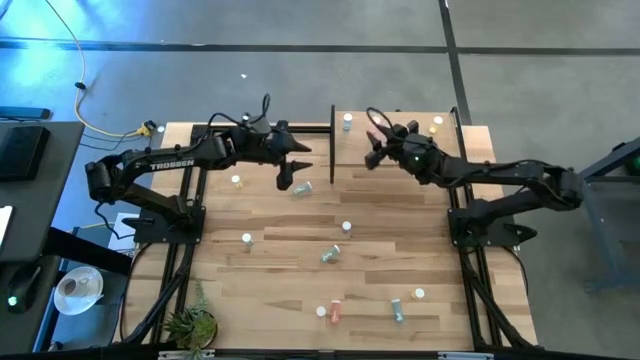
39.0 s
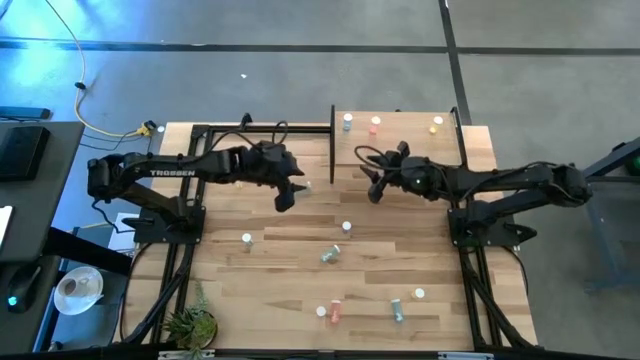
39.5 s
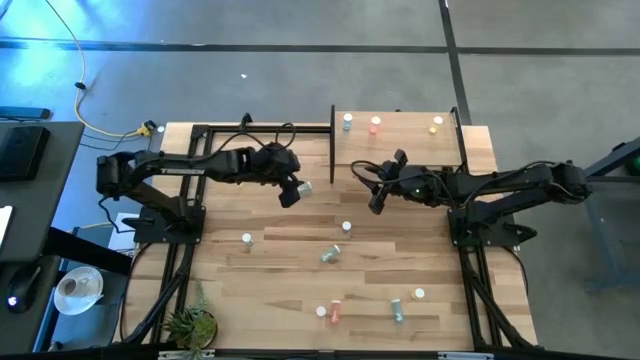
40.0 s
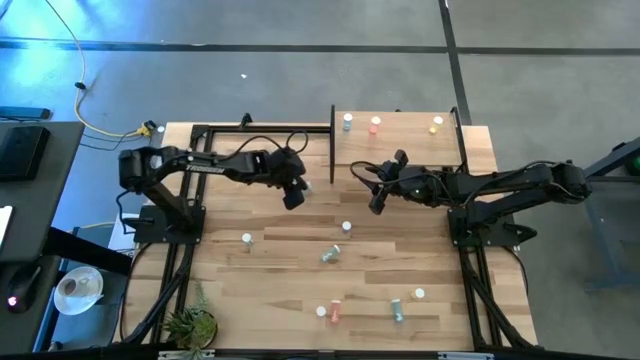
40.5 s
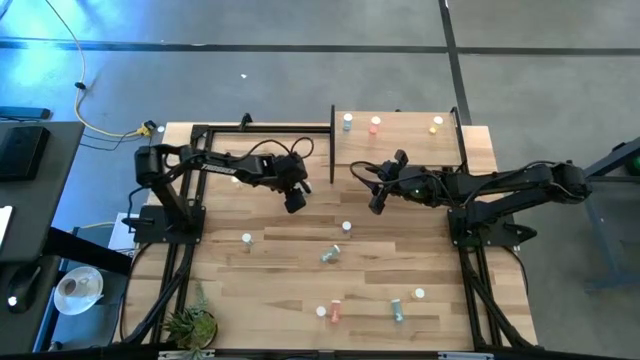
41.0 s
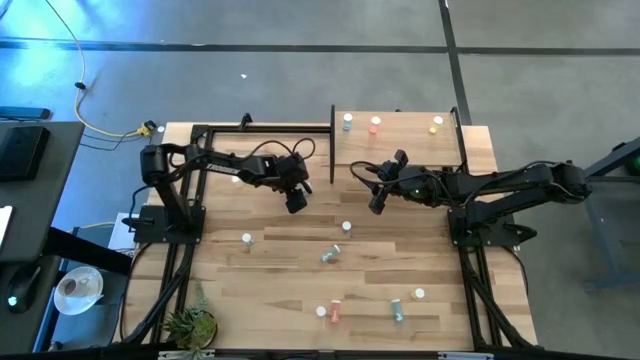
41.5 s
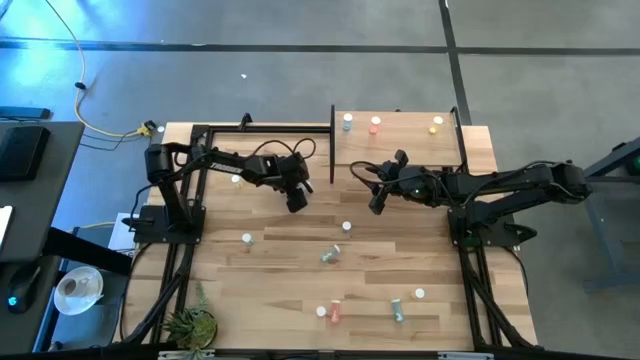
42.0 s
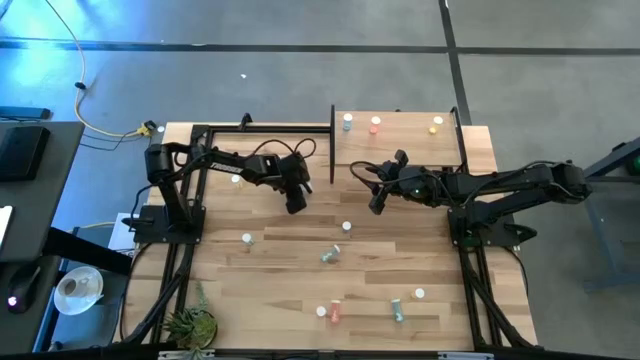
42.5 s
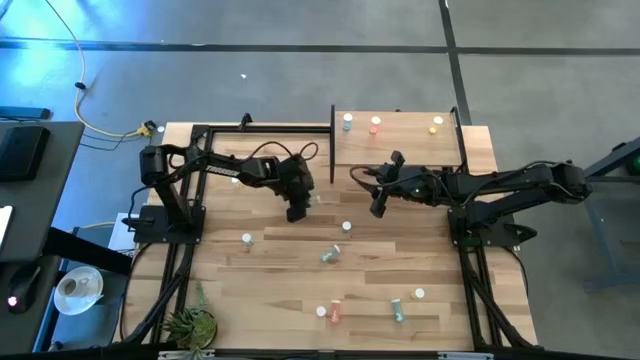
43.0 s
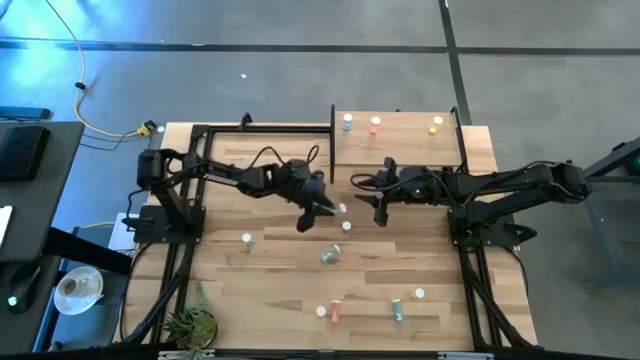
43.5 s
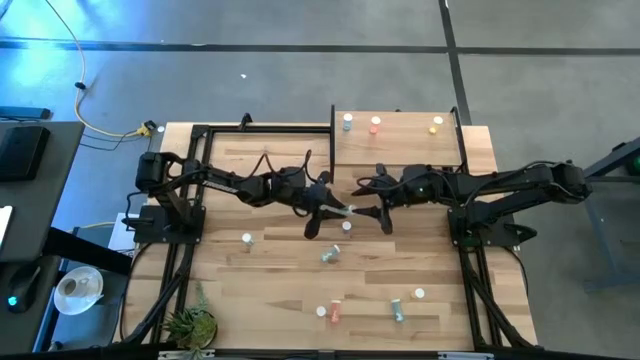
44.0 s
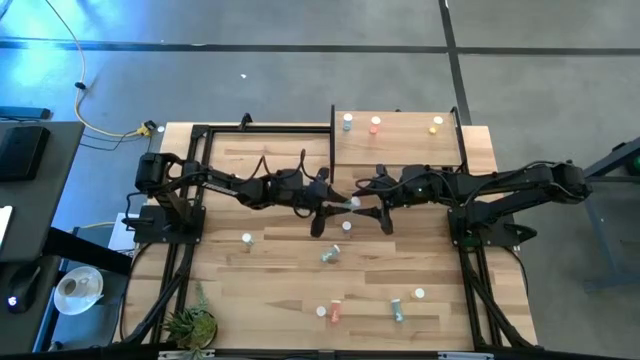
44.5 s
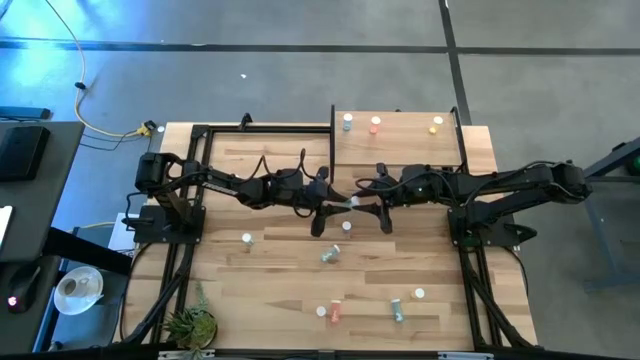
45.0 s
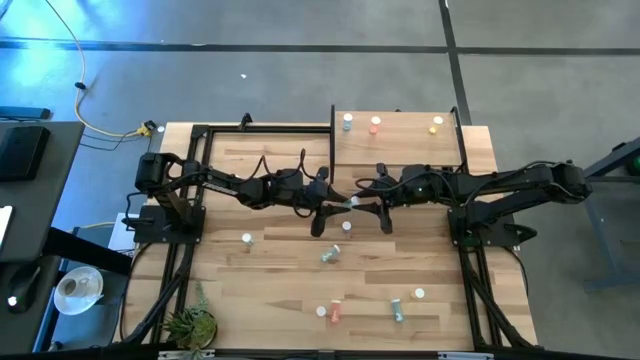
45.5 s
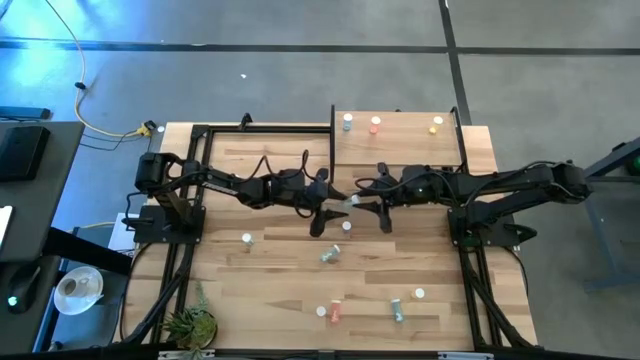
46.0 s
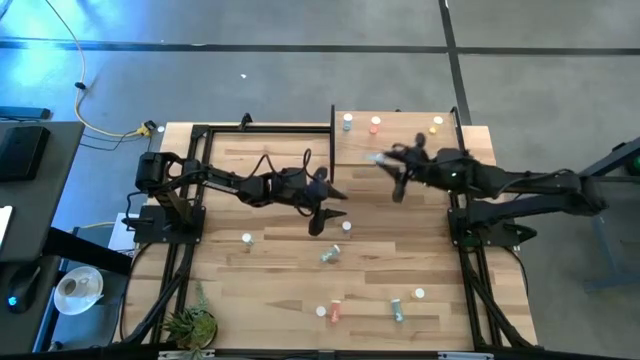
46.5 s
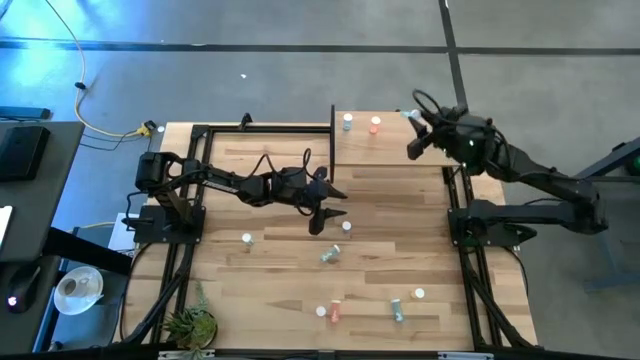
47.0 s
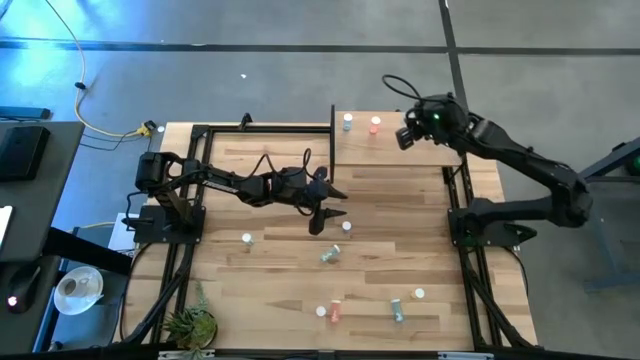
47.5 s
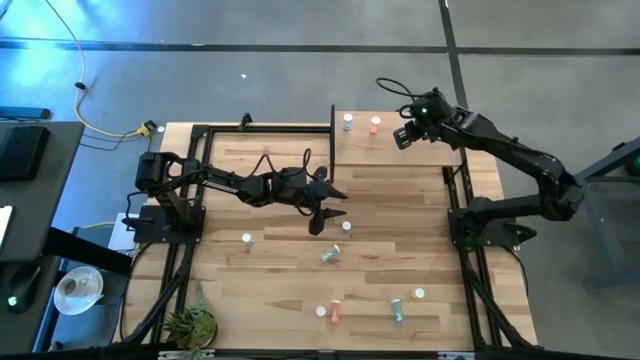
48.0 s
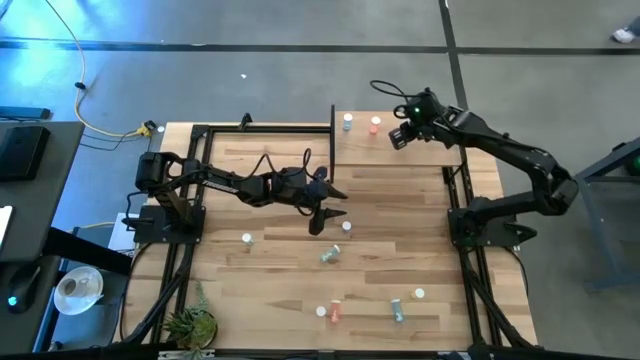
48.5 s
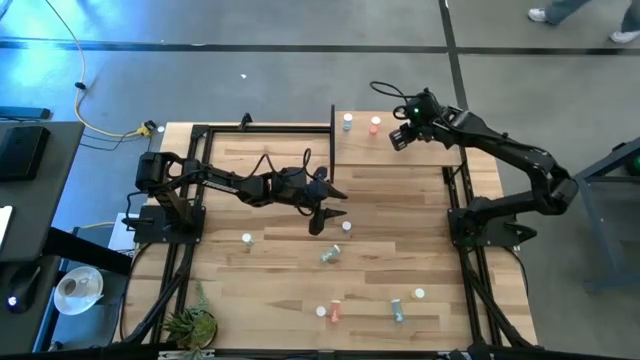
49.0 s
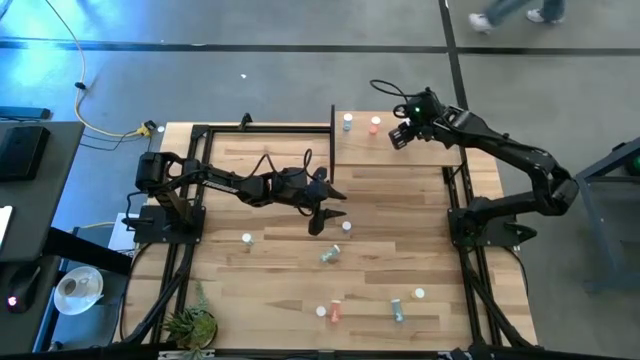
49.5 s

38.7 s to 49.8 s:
Task: Pick and place medicine bottles onto shelf by color
Put the top green pill bottle on the shelf

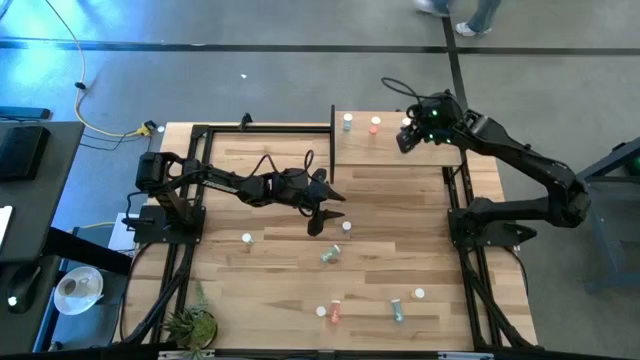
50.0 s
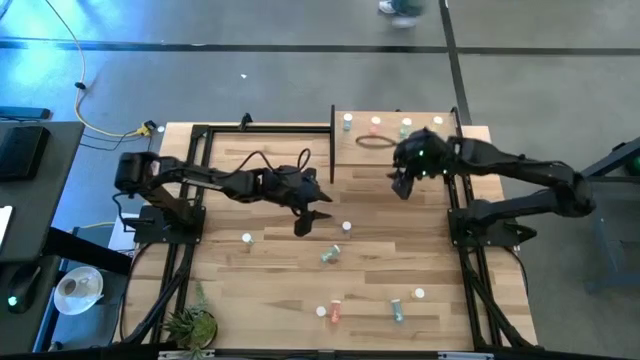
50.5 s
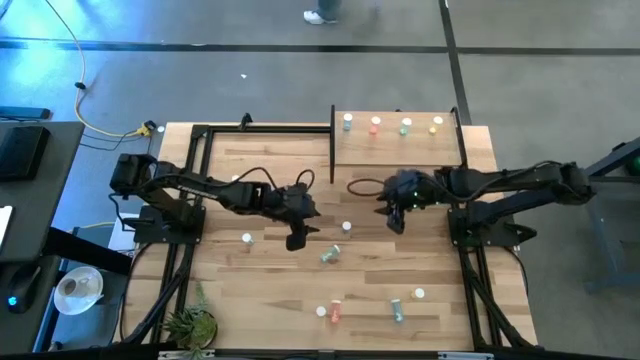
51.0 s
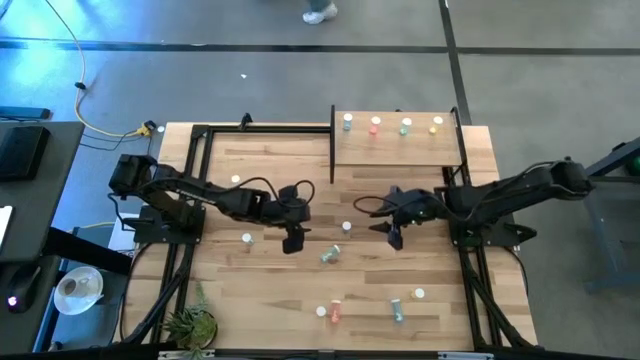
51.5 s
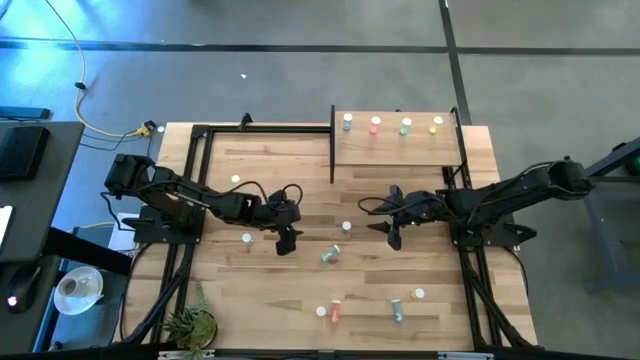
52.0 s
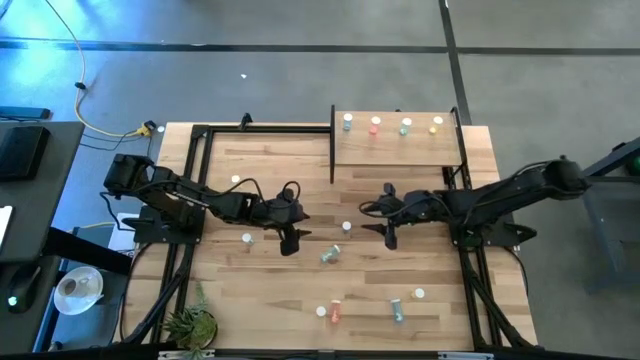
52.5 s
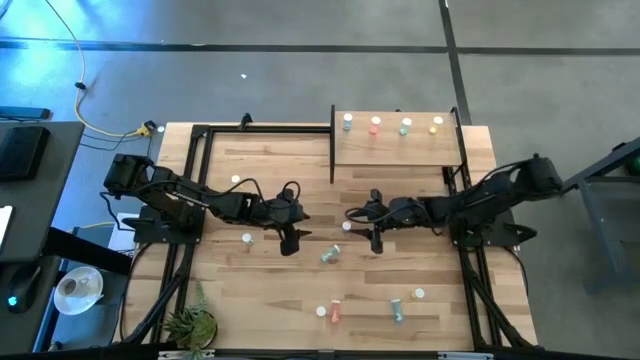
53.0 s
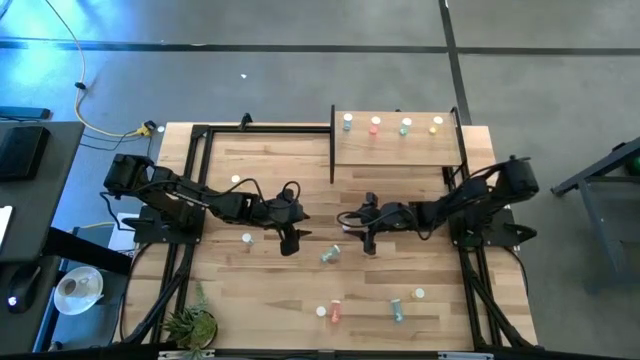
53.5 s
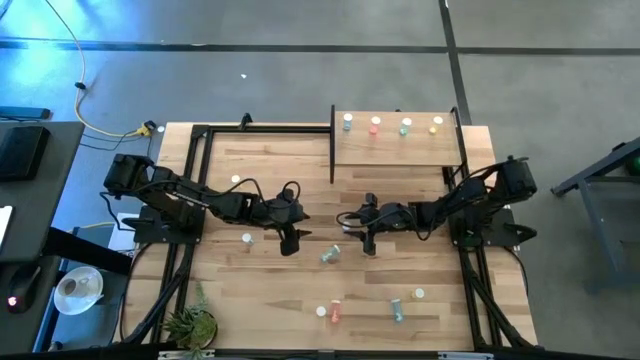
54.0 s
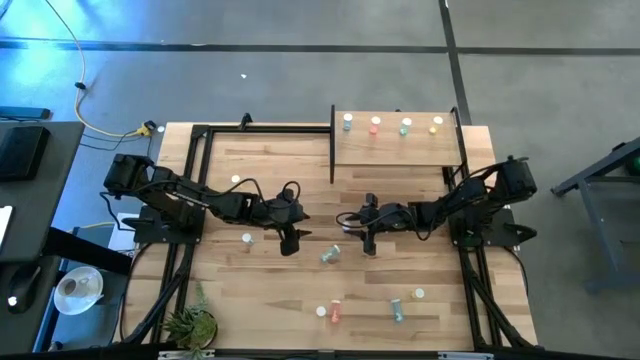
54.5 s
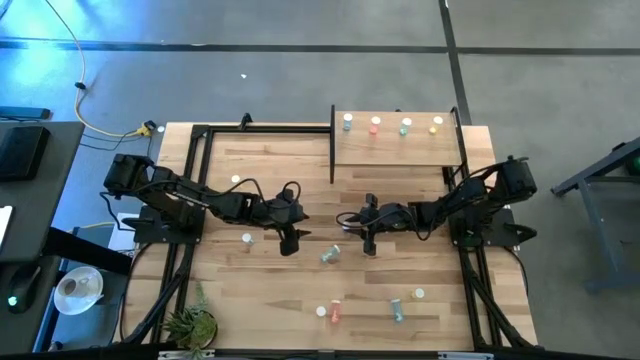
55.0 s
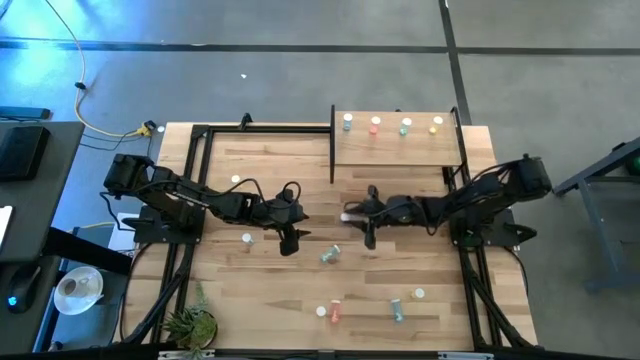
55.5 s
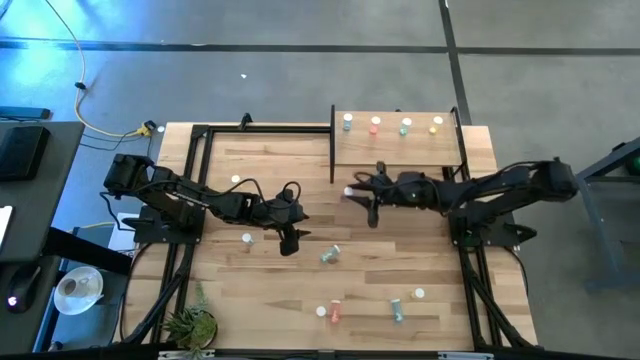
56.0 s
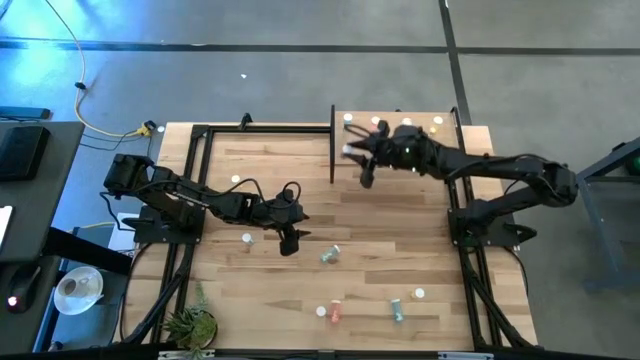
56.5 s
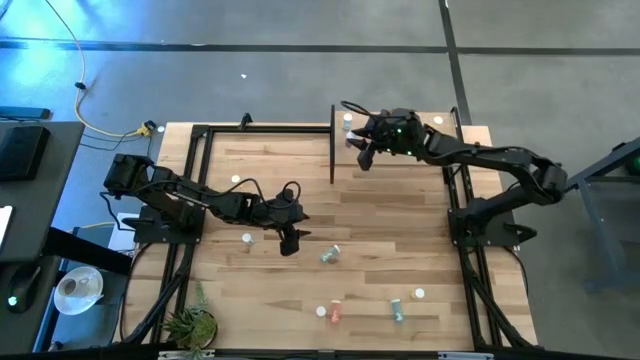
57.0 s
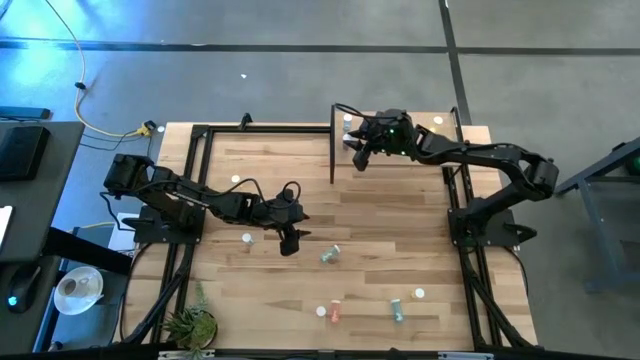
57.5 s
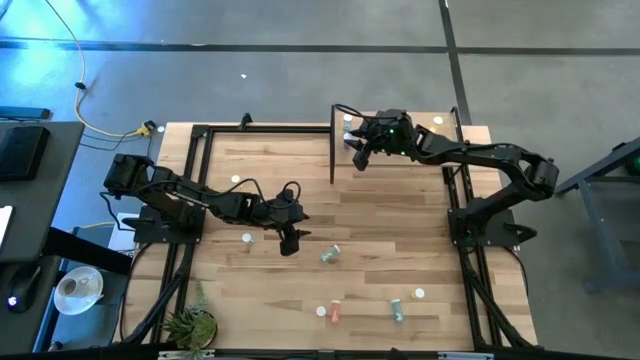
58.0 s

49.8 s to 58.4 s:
Put the top blue pill bottle on the shelf aligned with the blue pill bottle

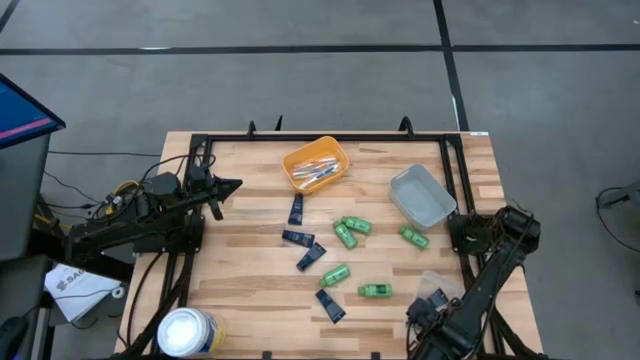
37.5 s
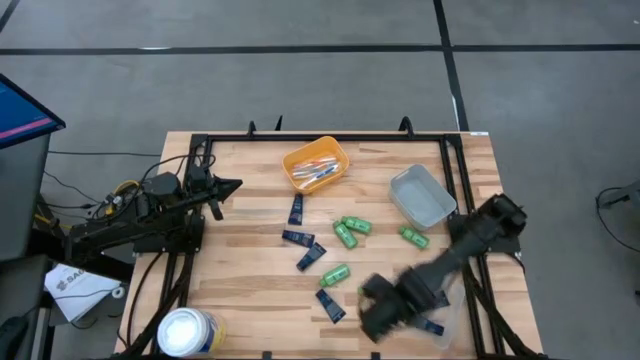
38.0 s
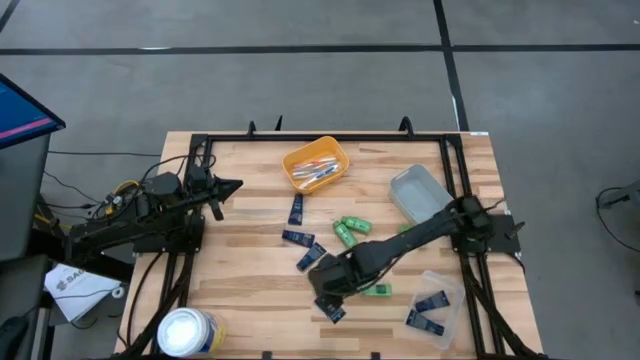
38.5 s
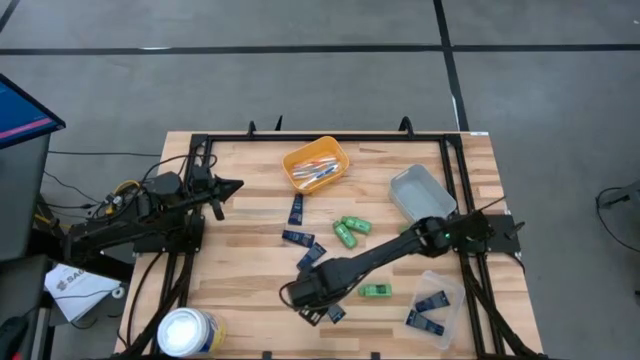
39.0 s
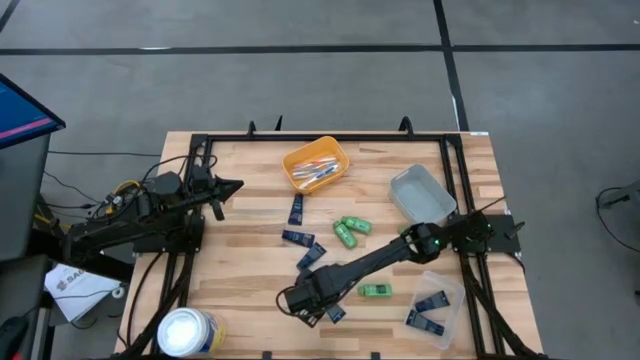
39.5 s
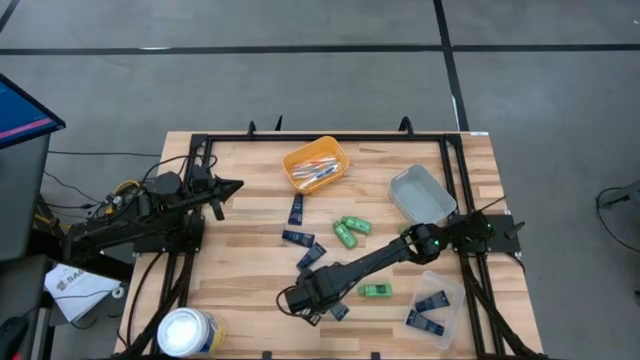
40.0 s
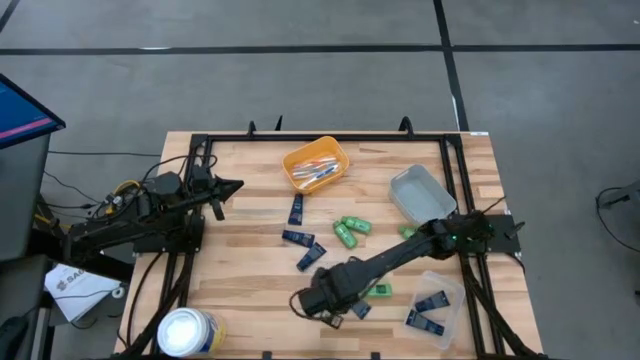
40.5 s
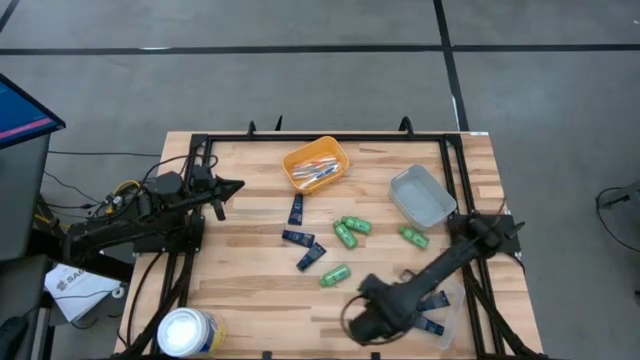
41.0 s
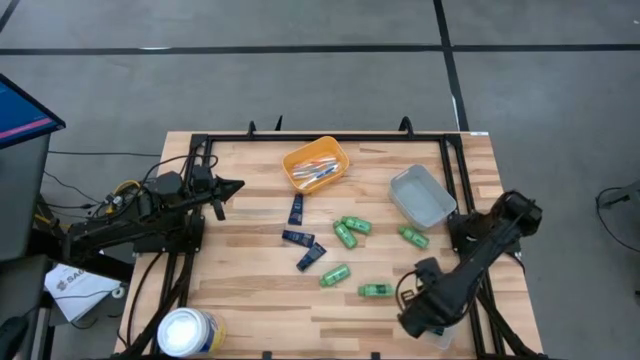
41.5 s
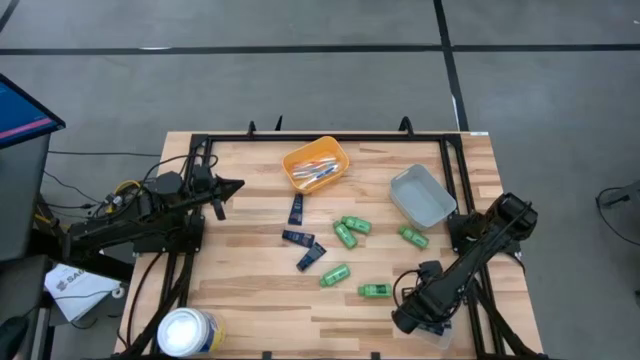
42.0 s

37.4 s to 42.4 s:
Task: Pick & Place Travel size toiletries
Put the dark blue shave cream into the transparent bin
